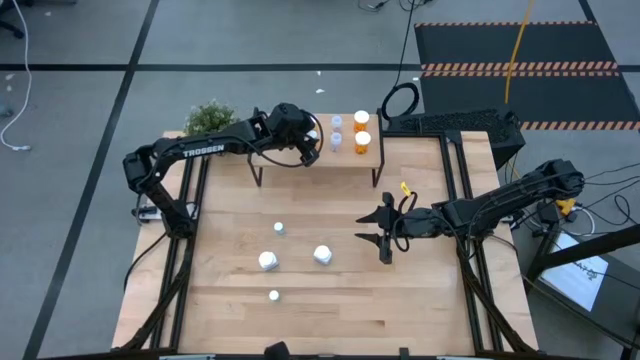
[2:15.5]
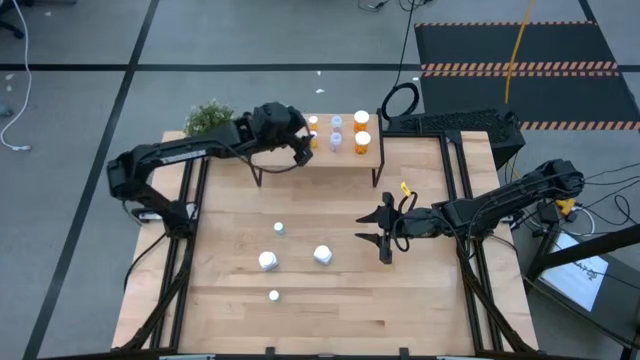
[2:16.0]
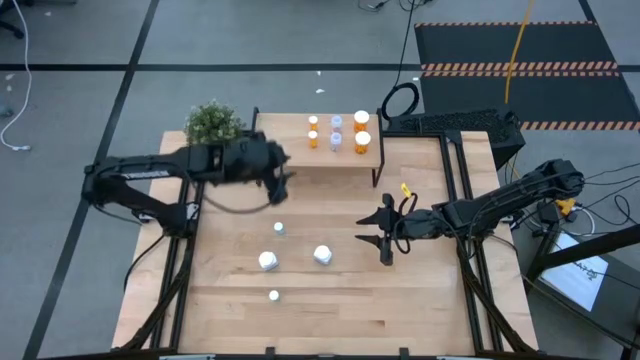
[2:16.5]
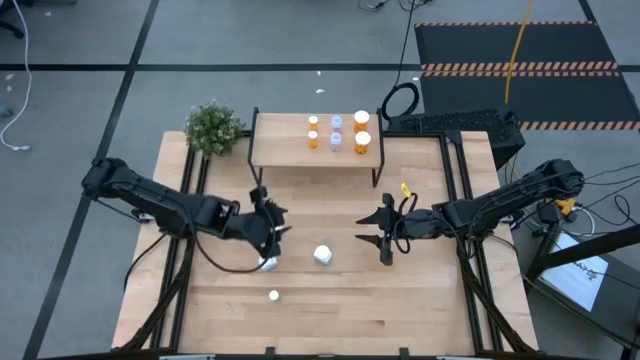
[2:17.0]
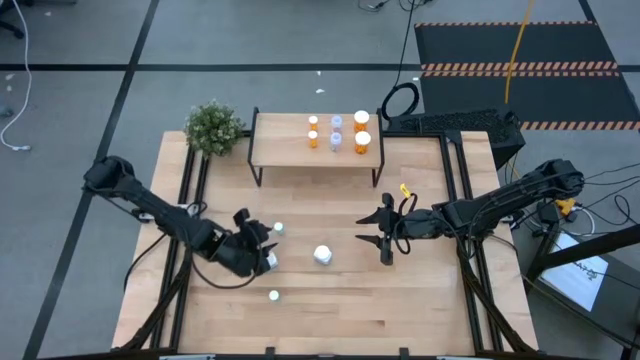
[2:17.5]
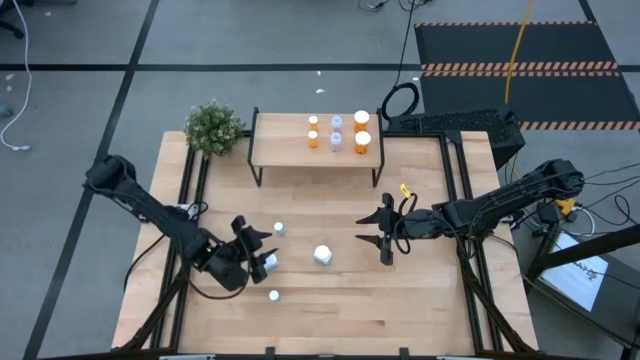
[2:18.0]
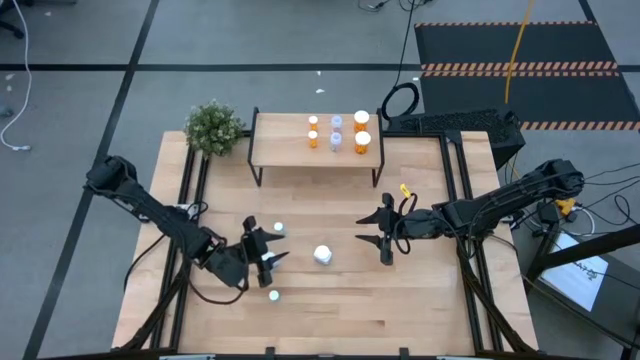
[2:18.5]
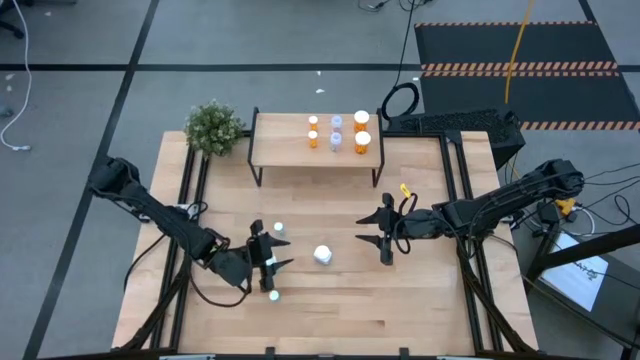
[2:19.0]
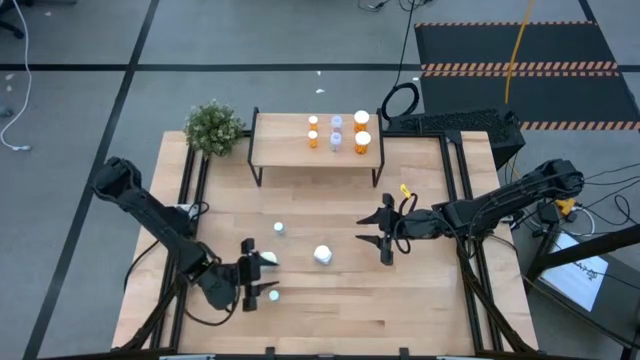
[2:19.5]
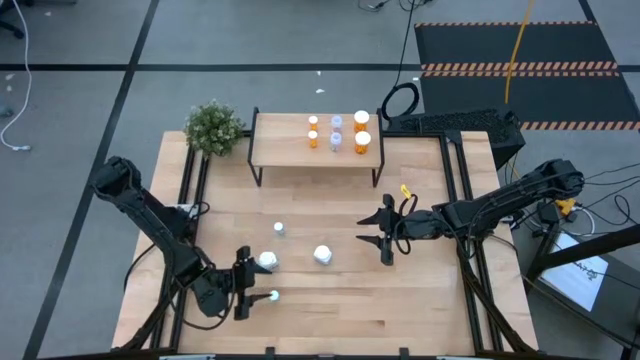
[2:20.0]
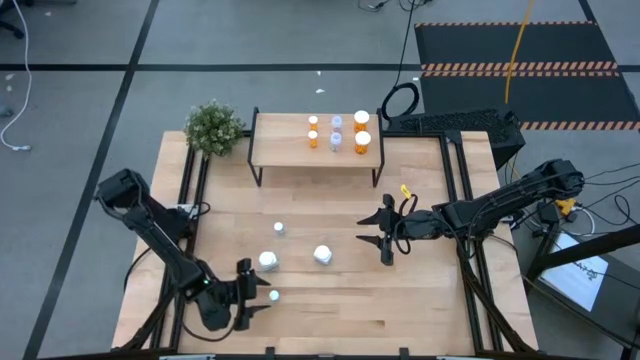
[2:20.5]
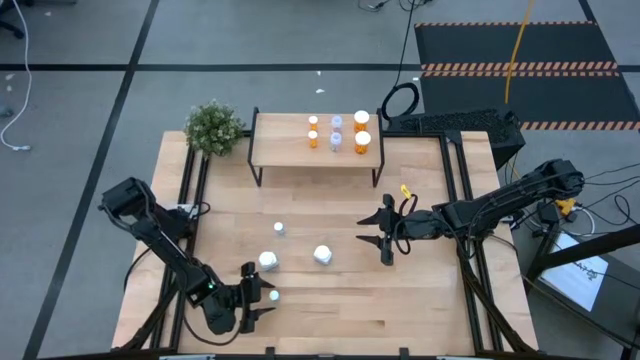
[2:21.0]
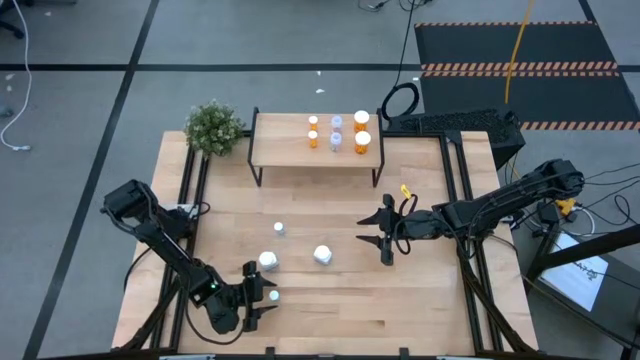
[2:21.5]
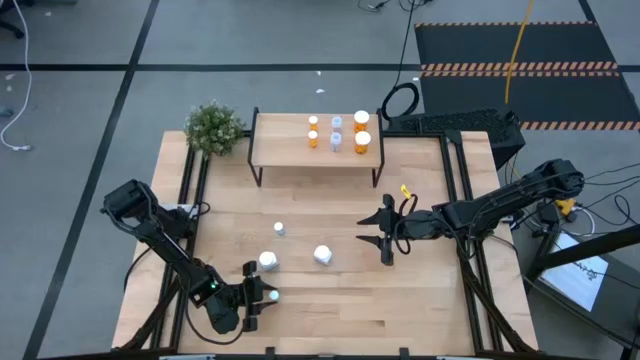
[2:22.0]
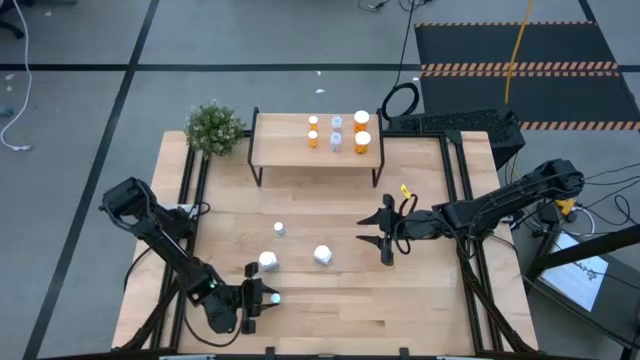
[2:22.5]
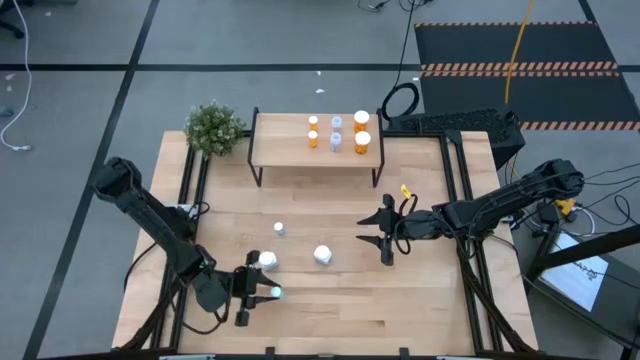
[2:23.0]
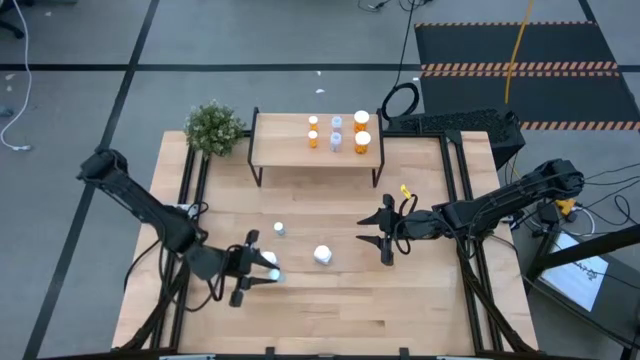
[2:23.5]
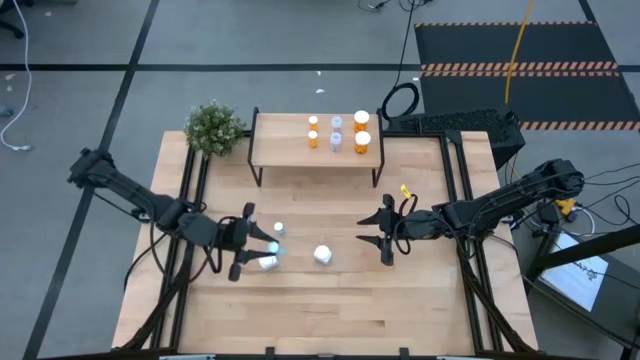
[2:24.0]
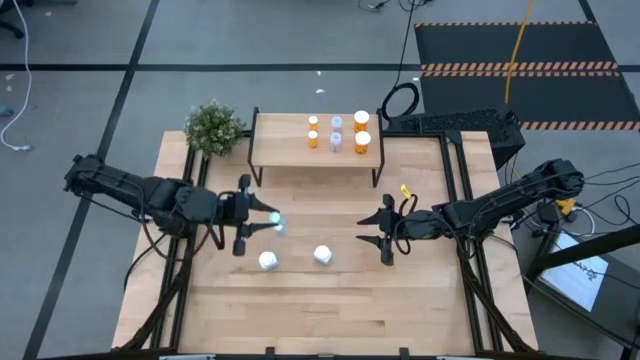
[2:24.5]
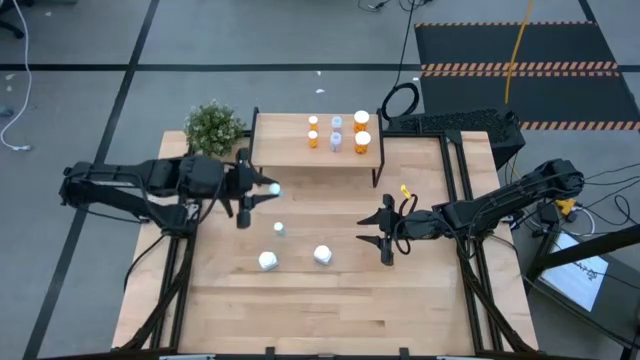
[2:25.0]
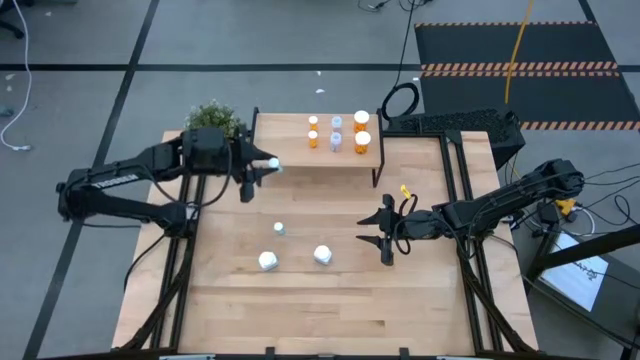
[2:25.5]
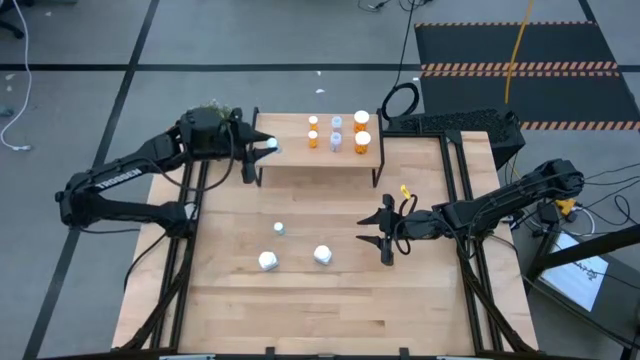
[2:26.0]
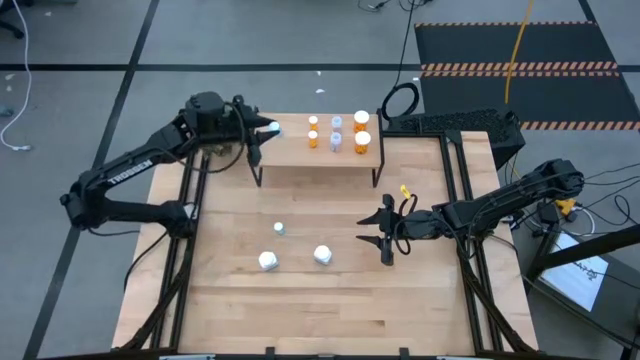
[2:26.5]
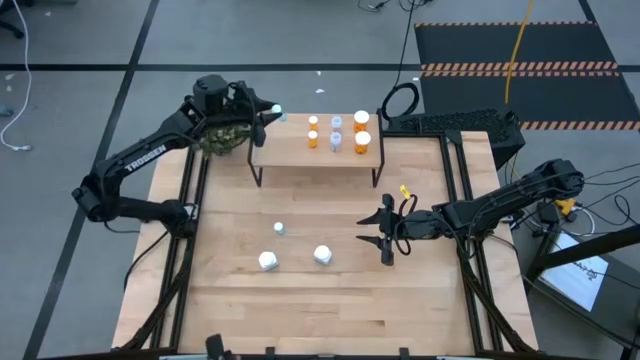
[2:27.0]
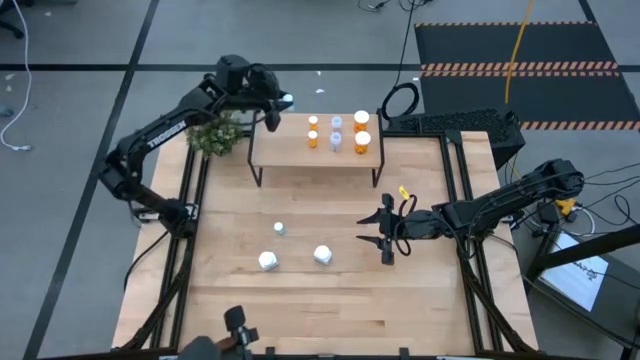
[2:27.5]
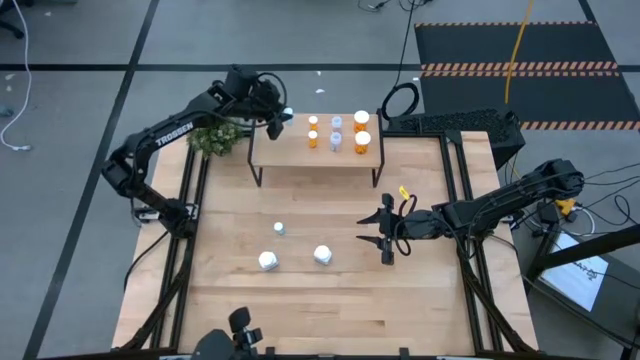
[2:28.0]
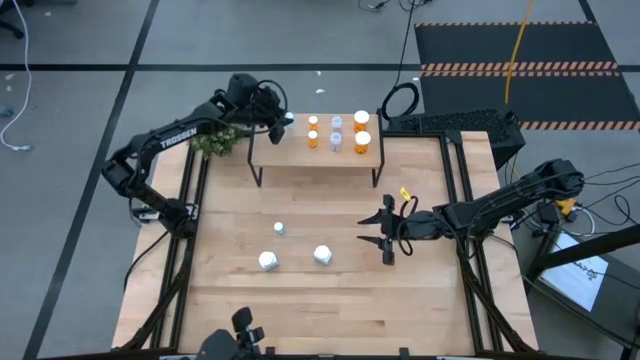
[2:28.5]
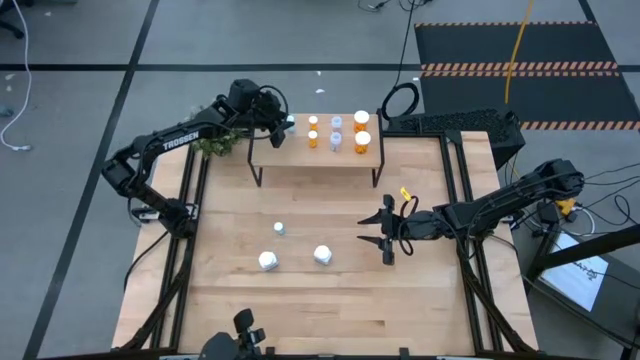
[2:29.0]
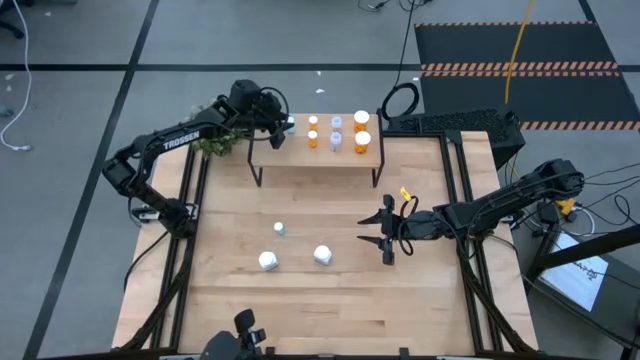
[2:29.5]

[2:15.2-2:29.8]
Task: Pick and place medicine bottles onto shelf by color
Put the bottom small blue pill bottle on the shelf

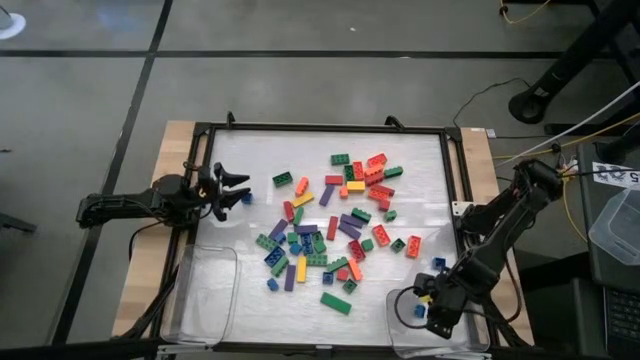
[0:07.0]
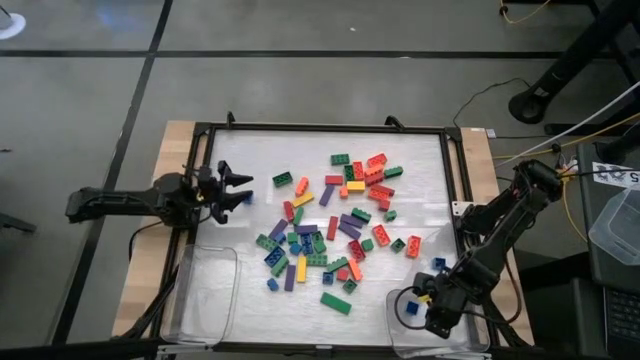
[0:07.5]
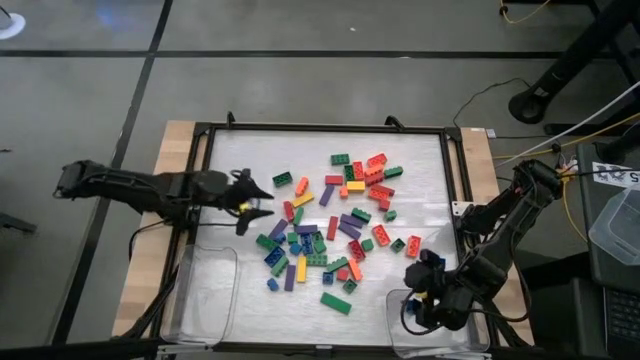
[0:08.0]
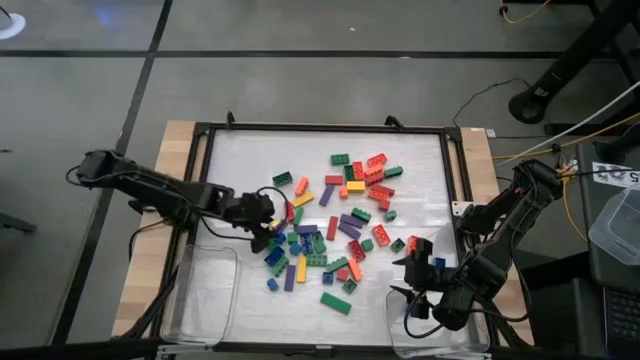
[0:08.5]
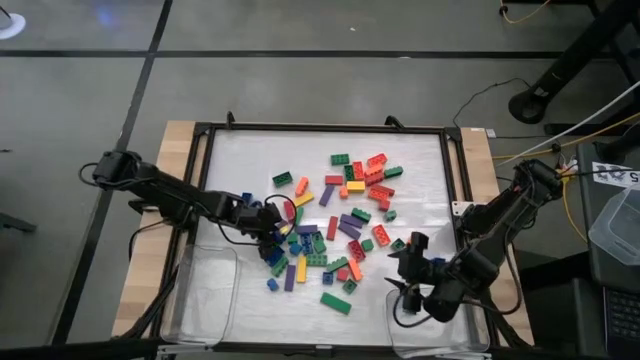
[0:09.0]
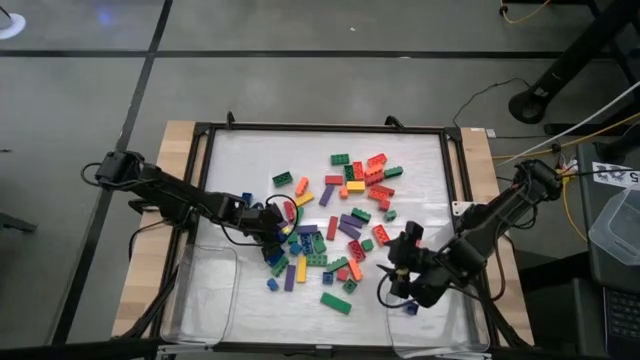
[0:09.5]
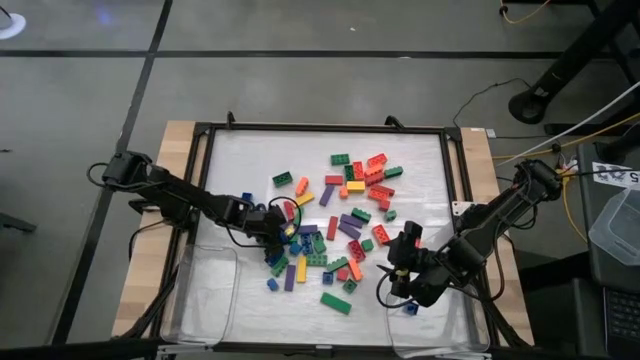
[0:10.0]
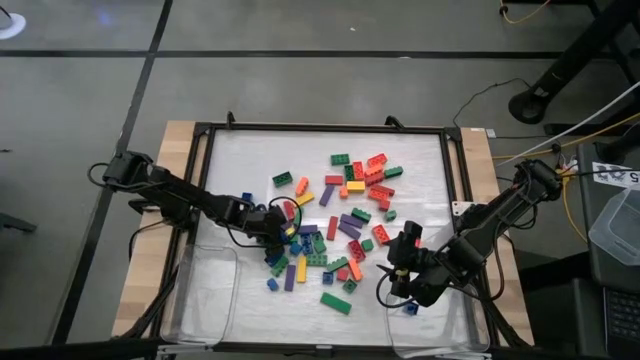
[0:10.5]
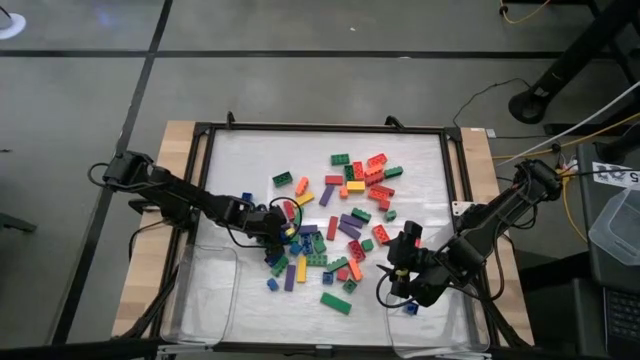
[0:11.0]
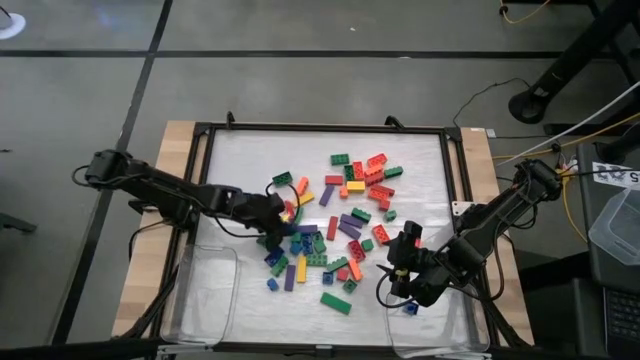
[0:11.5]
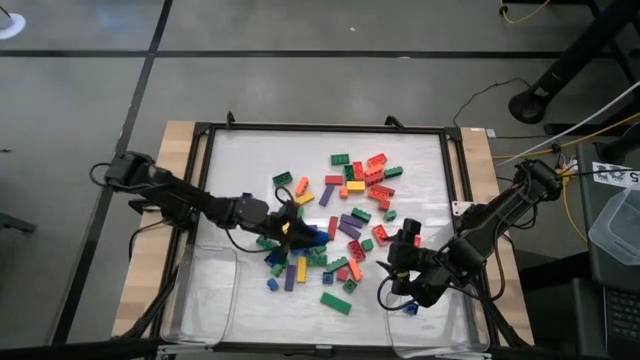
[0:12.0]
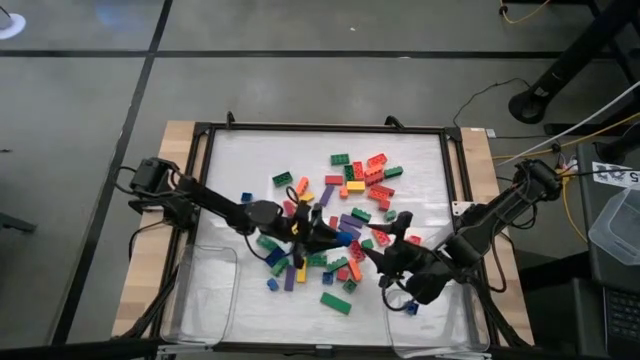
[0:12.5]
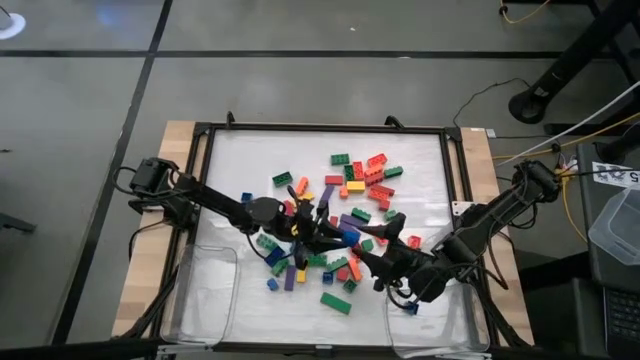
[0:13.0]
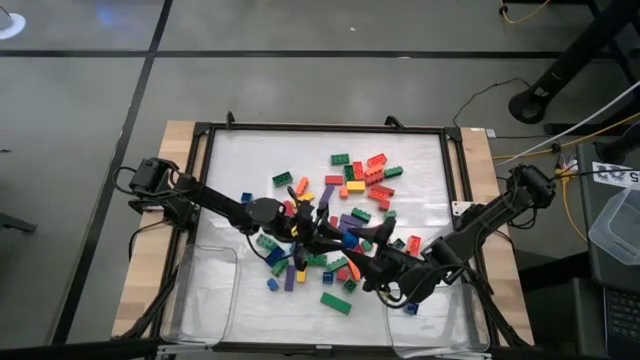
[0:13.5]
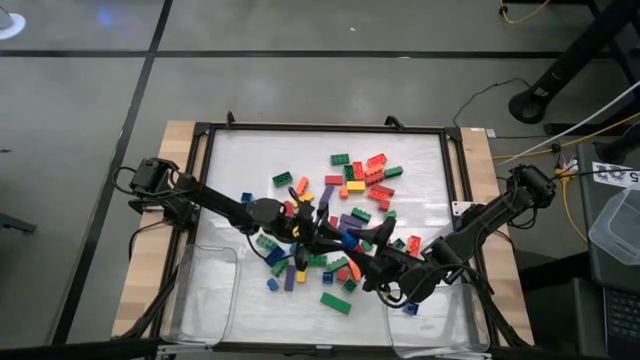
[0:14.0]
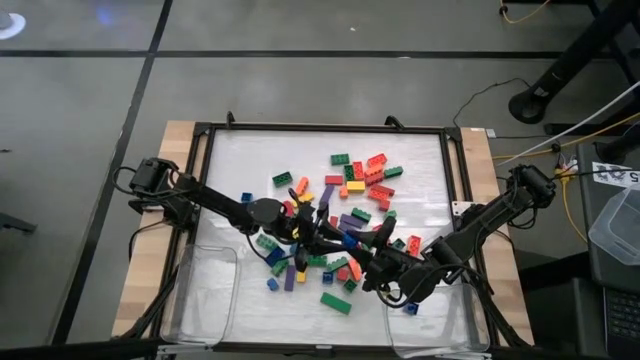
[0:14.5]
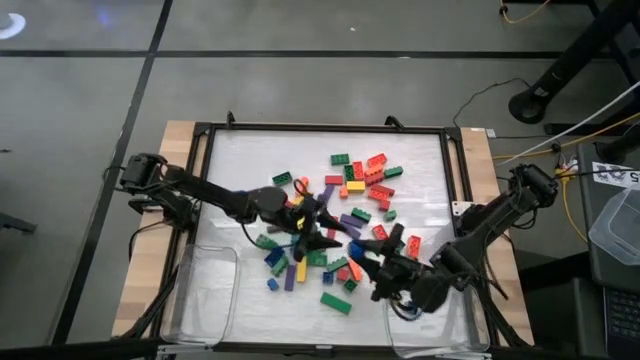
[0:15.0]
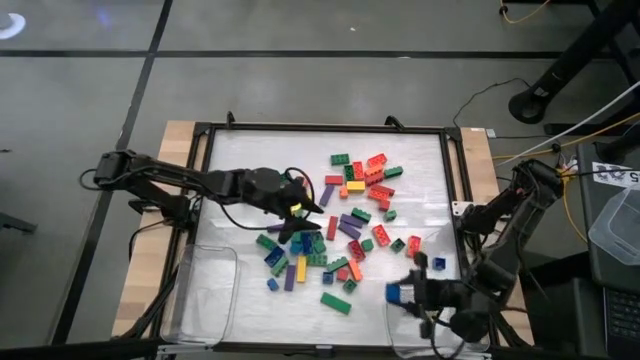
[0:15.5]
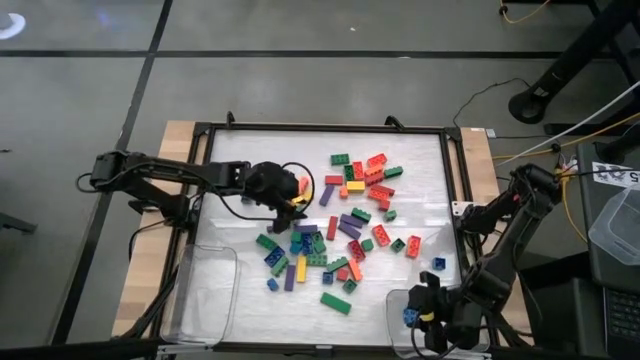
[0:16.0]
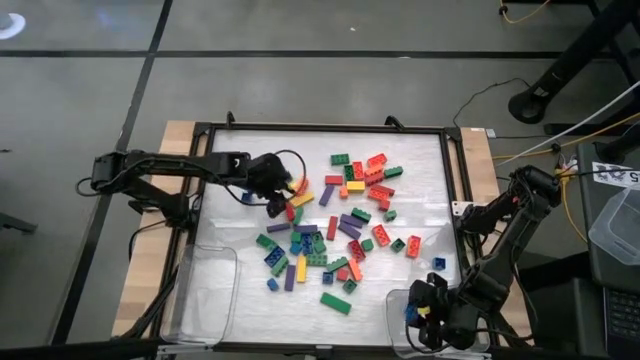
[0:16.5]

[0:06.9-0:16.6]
Task: Sort blocks by size
Put the small blue game piece into the right transparent bin
